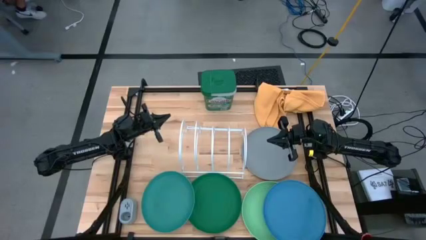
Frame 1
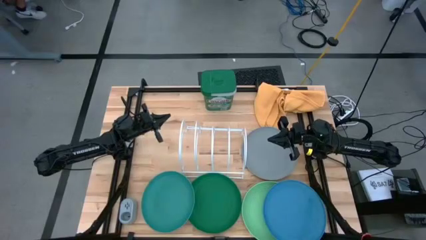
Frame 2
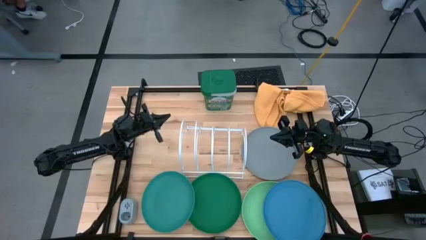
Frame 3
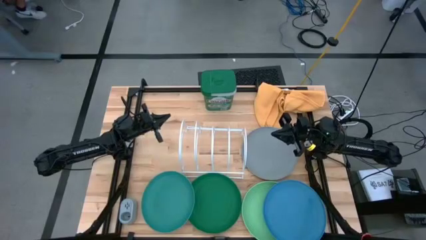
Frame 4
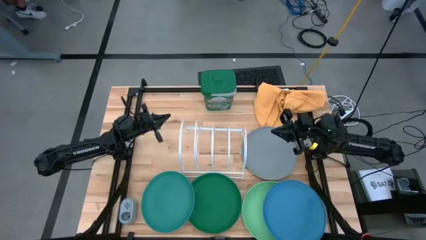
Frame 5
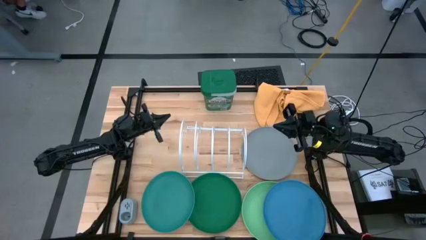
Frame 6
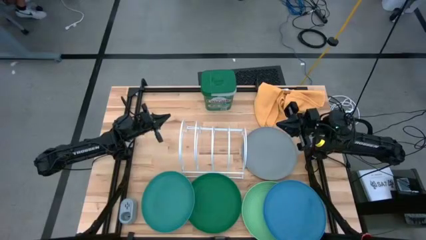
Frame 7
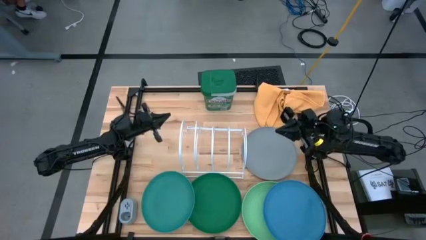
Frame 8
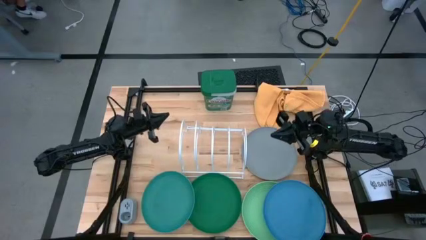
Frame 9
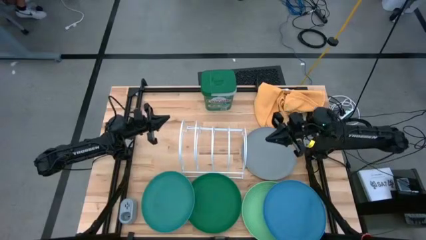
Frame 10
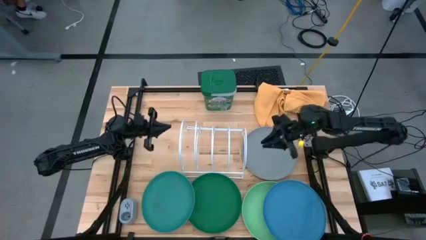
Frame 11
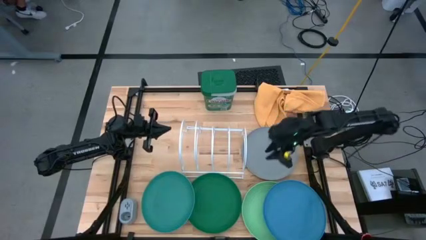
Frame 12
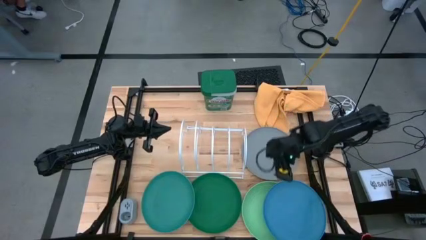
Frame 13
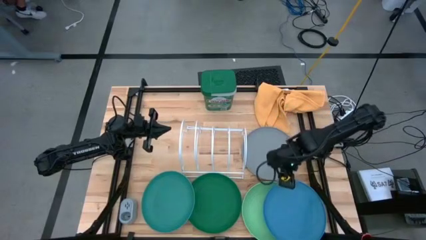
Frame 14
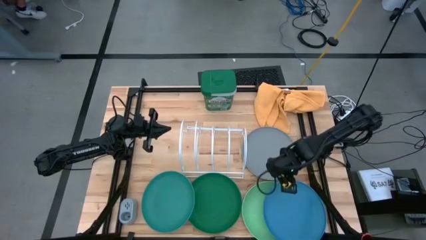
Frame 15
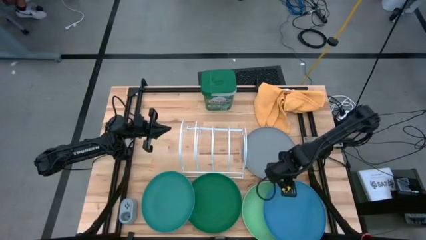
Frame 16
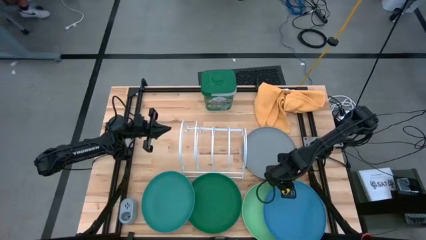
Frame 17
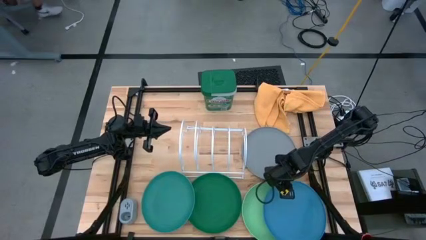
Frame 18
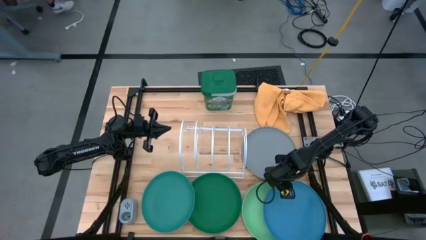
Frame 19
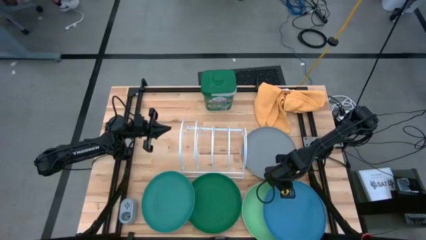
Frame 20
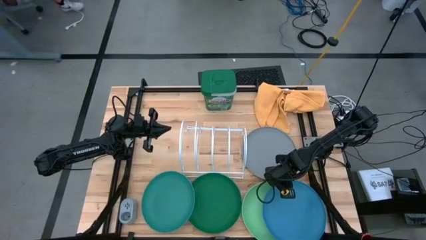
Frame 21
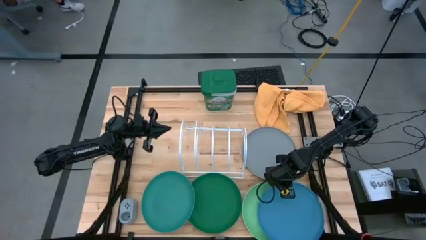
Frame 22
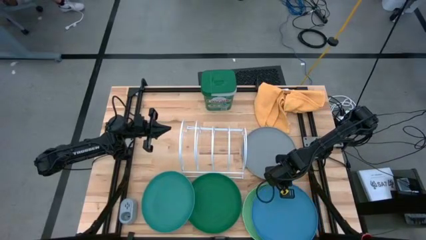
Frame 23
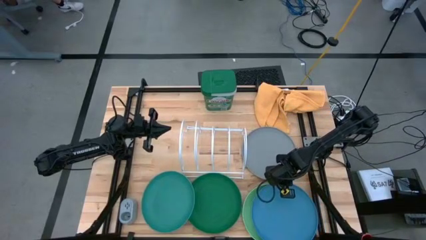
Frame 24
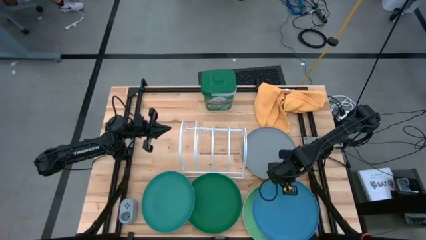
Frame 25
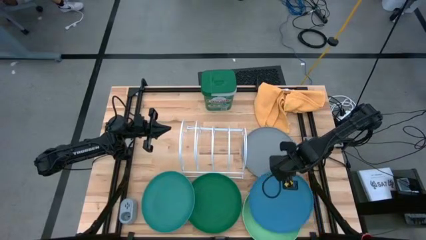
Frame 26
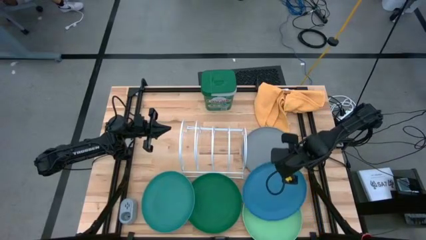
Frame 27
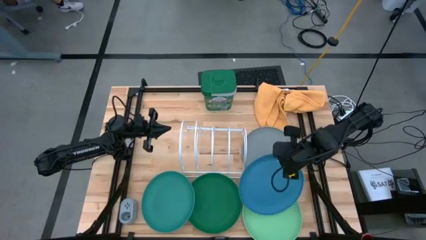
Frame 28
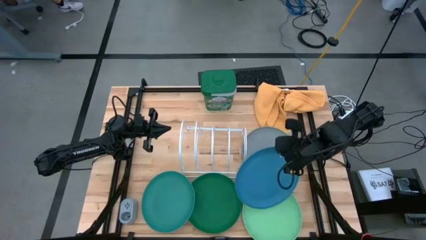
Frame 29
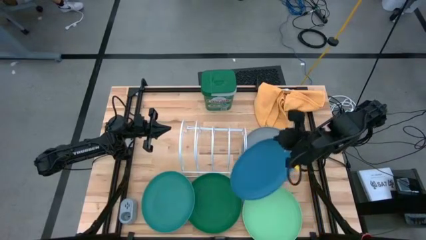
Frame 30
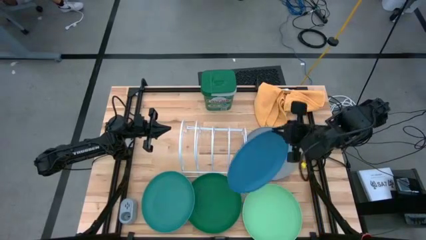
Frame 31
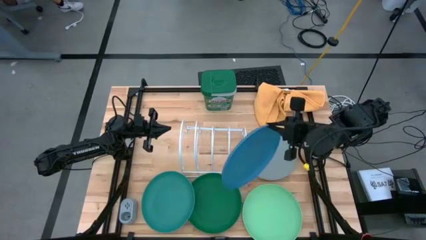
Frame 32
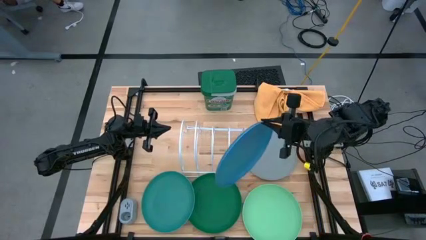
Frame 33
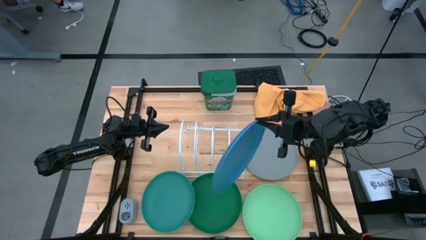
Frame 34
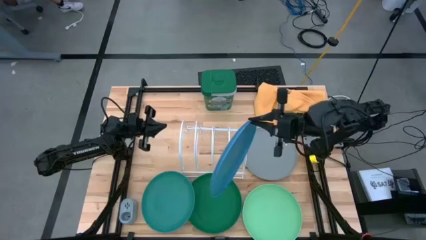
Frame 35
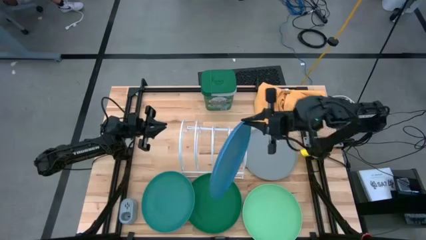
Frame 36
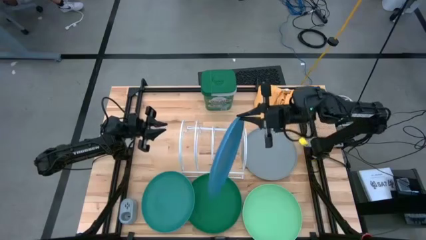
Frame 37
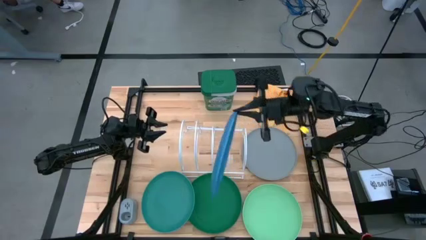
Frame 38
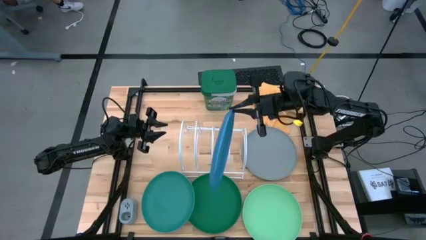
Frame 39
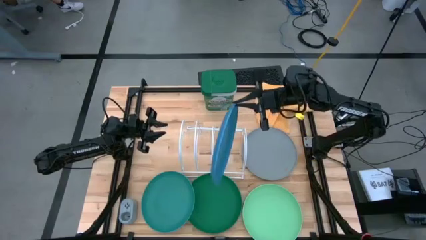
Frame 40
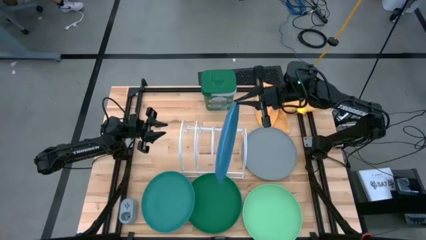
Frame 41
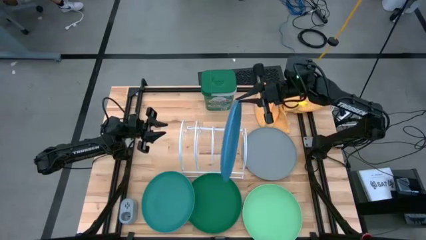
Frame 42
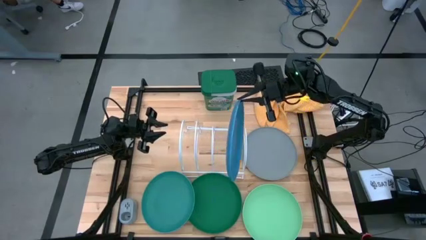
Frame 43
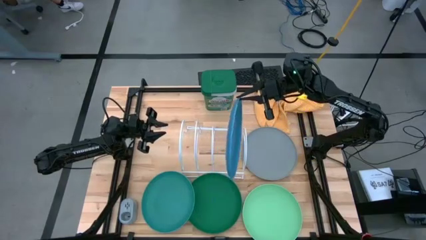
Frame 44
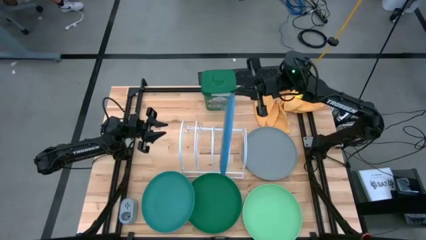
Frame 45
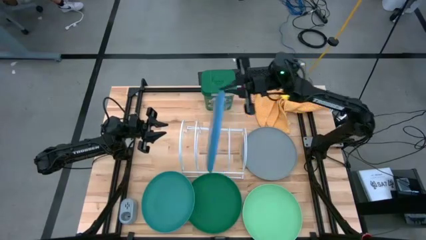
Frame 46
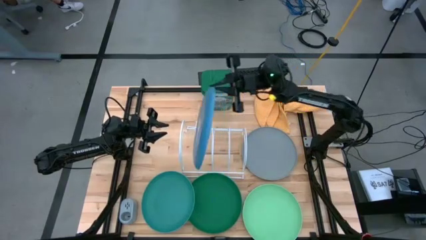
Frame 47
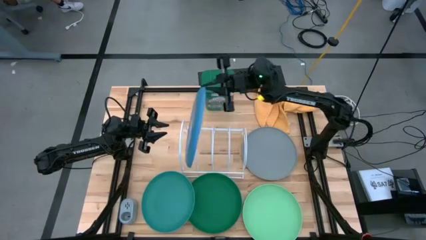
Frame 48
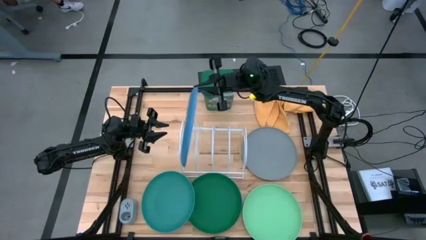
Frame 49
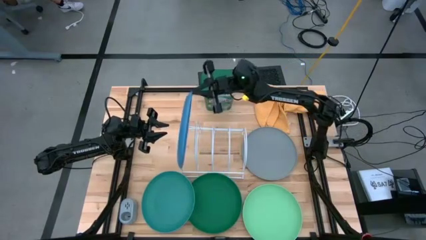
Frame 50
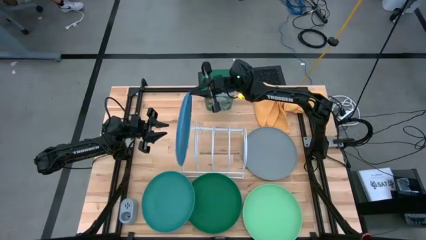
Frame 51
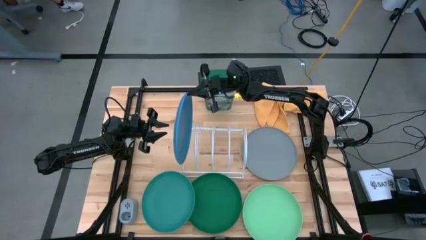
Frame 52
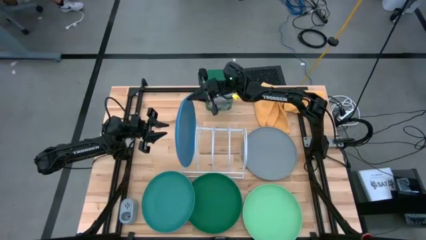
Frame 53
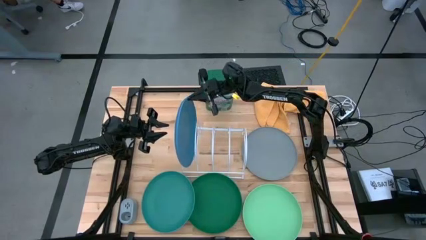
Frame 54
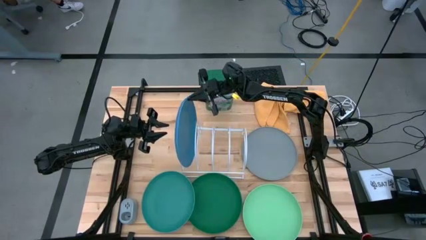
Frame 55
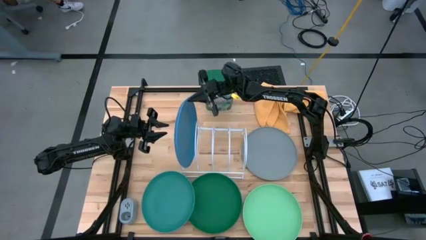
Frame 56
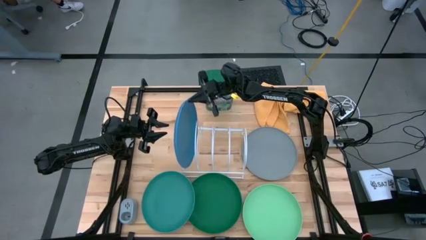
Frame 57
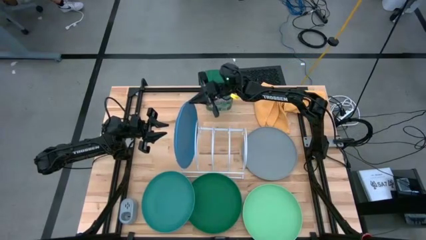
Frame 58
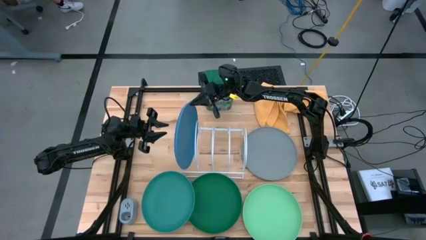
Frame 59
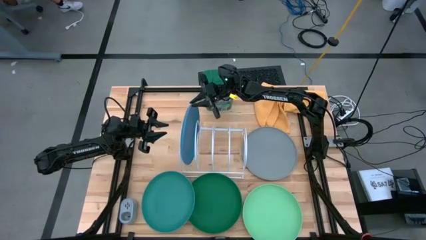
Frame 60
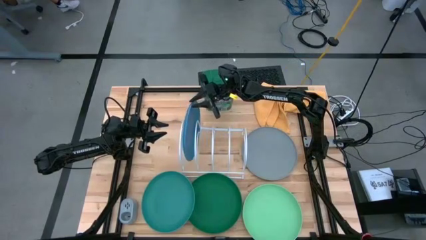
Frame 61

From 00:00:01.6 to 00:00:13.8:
Task: Sort dishes
Put the blue plate in the dish rack
